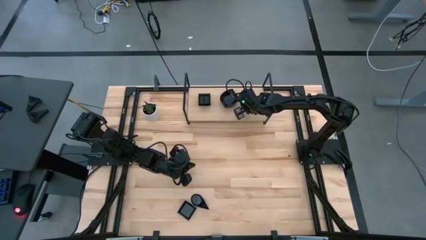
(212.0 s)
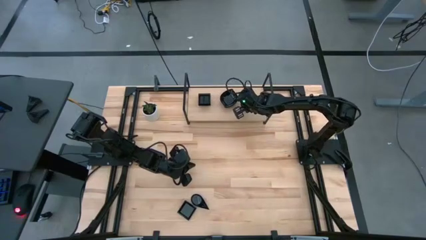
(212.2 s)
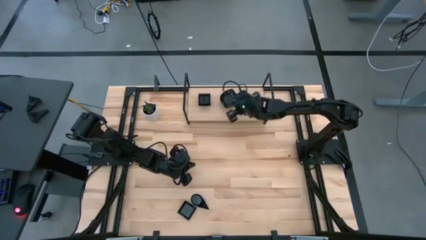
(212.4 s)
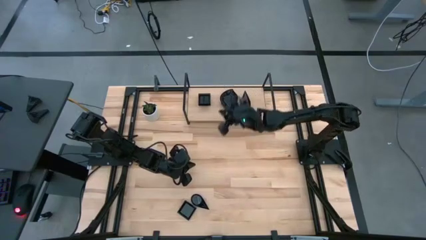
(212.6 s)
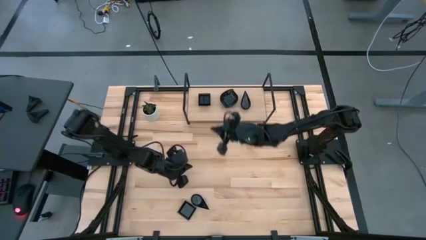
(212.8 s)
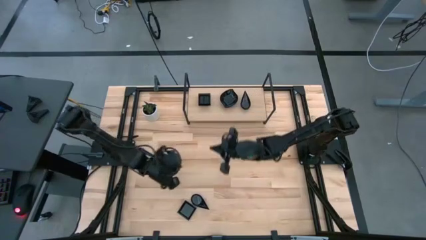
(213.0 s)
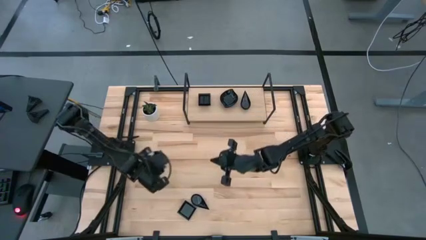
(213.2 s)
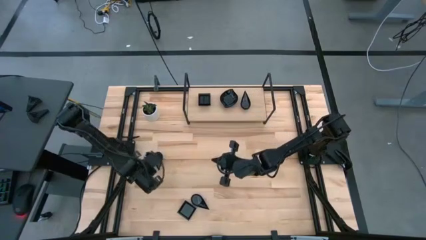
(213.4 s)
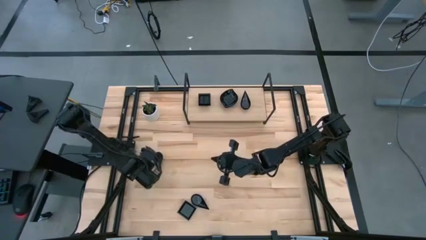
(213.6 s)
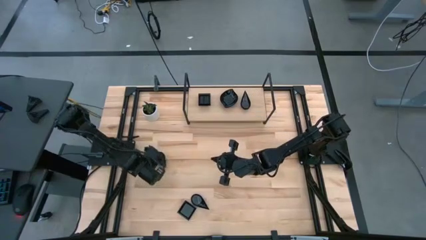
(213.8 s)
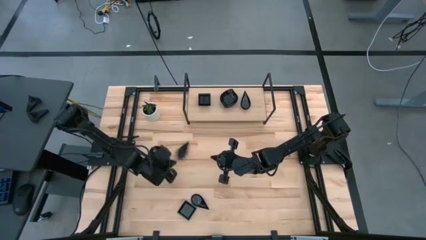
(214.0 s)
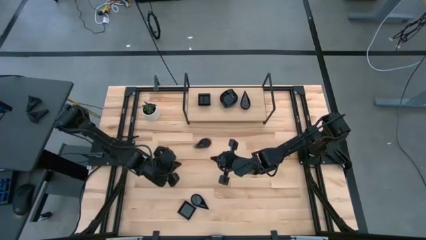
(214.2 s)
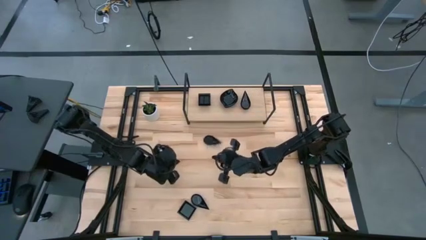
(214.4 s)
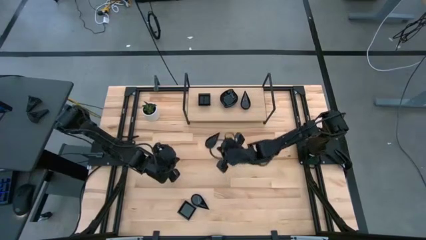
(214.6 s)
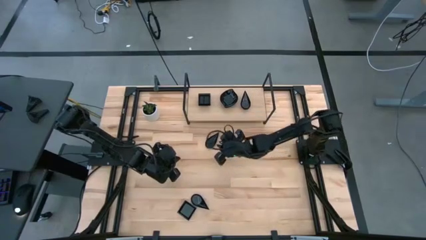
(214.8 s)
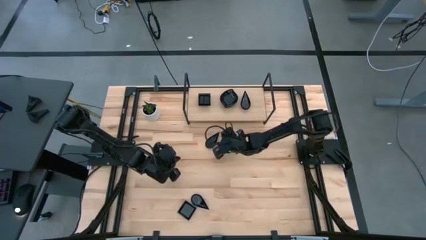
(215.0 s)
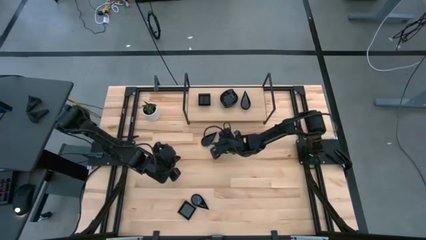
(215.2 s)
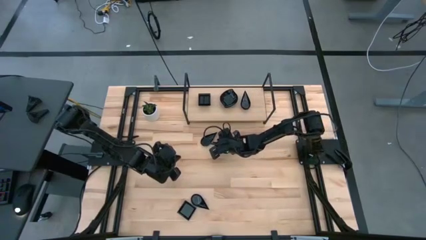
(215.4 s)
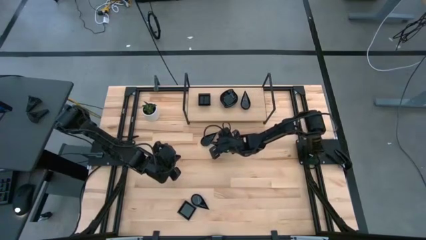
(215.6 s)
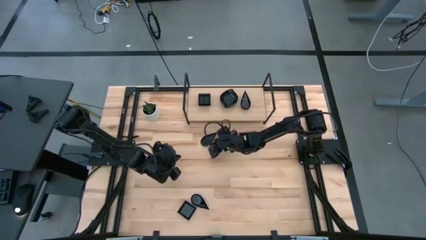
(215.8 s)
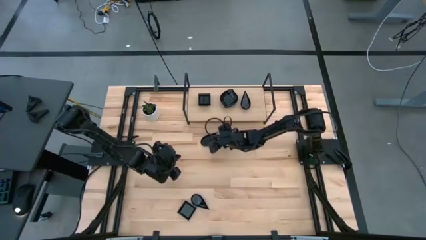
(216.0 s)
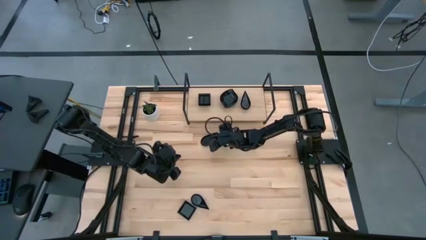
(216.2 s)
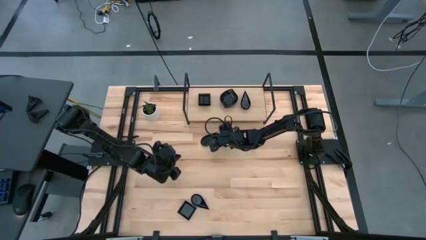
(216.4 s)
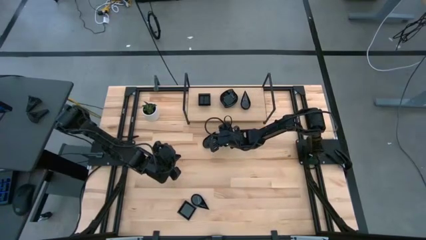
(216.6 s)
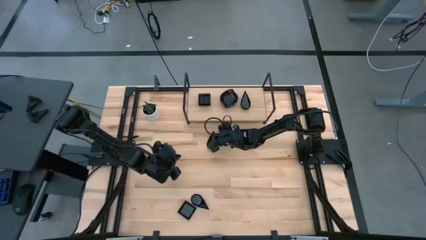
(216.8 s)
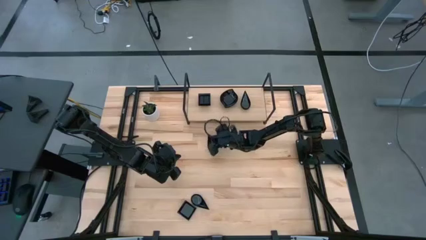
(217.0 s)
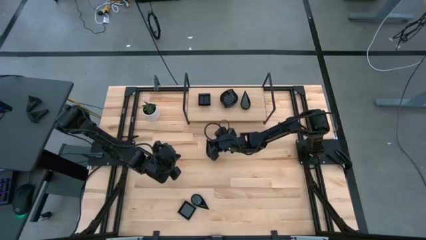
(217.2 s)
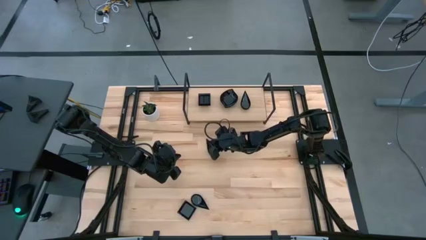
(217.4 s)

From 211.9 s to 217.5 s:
Task: Pick & Place Mini shaped plates
Stack the black teardrop shaped bowl on top of the other black teardrop shaped bowl on the shelf

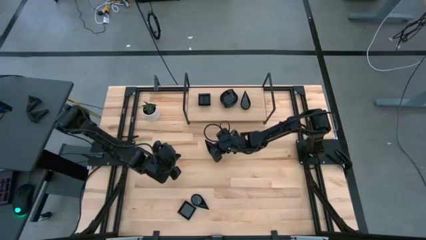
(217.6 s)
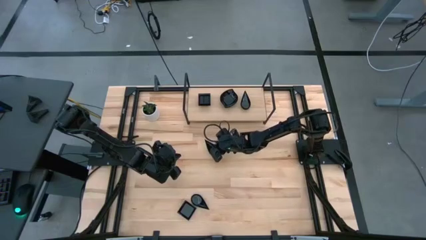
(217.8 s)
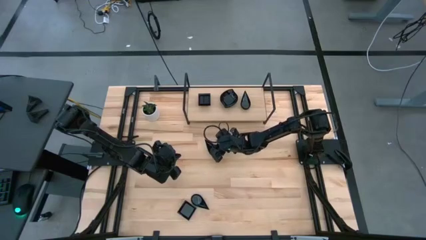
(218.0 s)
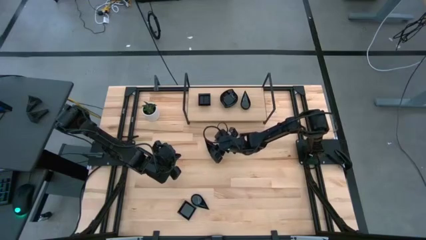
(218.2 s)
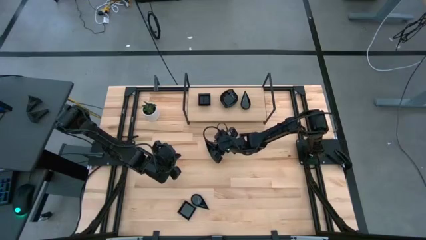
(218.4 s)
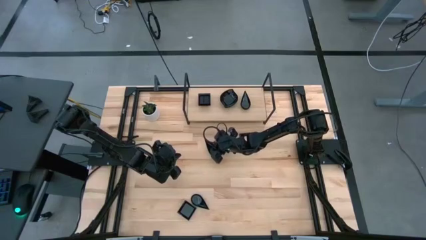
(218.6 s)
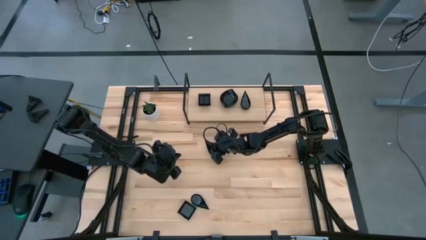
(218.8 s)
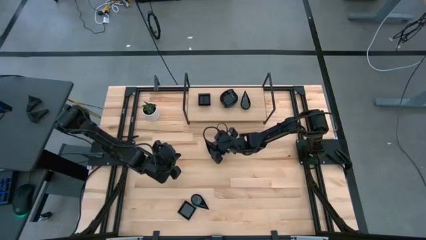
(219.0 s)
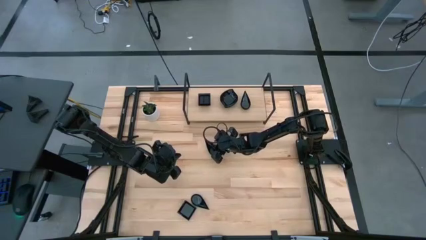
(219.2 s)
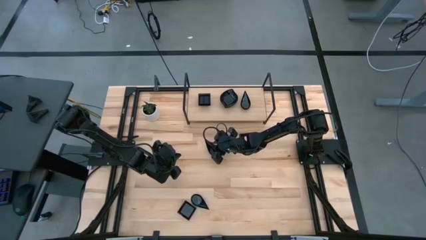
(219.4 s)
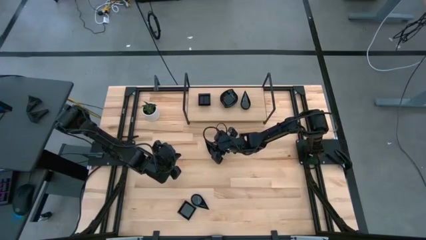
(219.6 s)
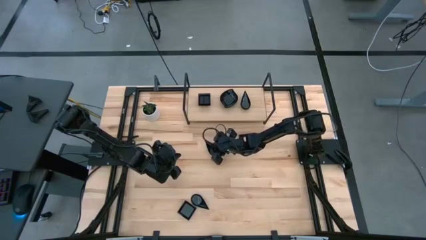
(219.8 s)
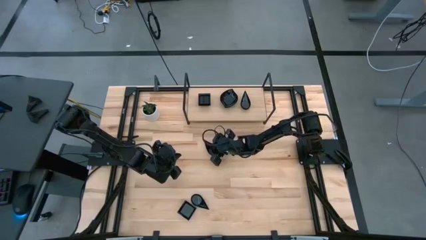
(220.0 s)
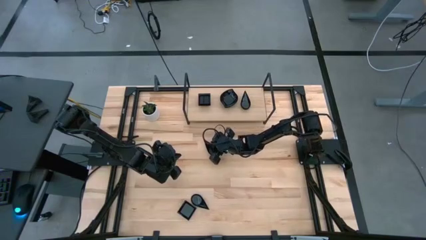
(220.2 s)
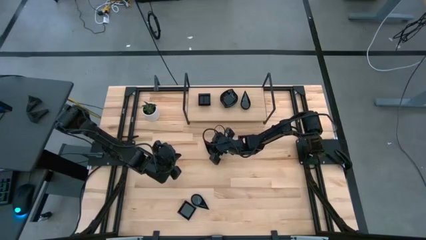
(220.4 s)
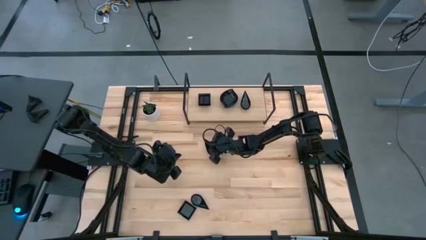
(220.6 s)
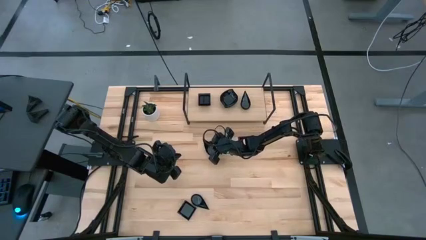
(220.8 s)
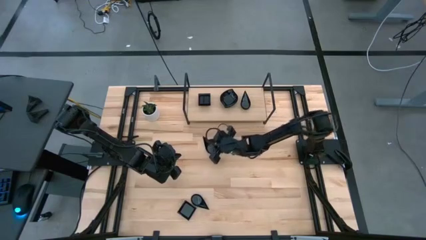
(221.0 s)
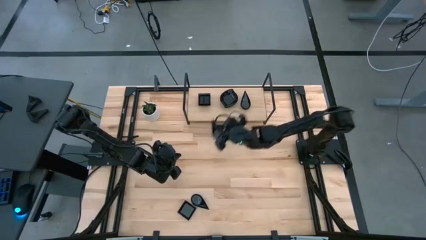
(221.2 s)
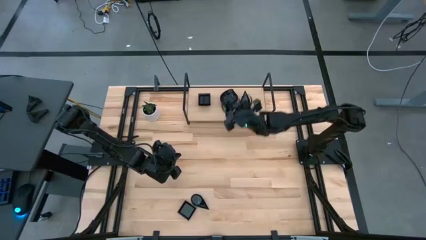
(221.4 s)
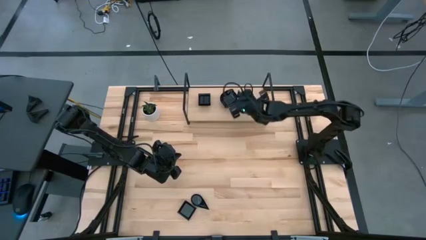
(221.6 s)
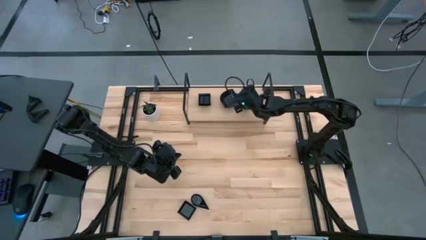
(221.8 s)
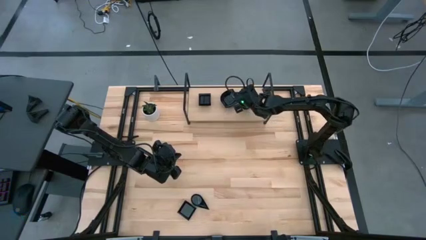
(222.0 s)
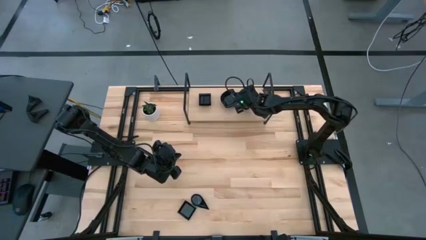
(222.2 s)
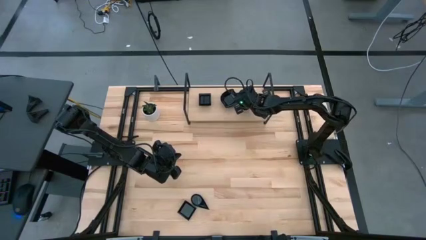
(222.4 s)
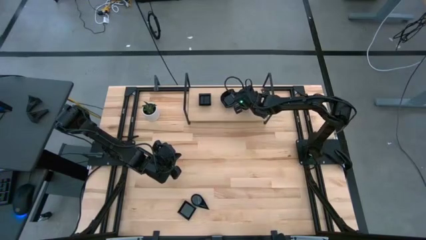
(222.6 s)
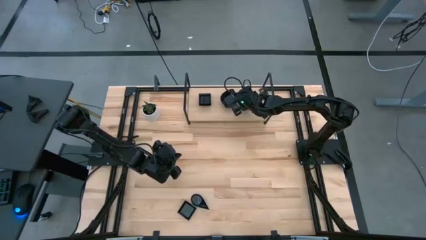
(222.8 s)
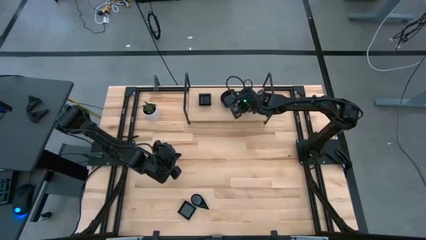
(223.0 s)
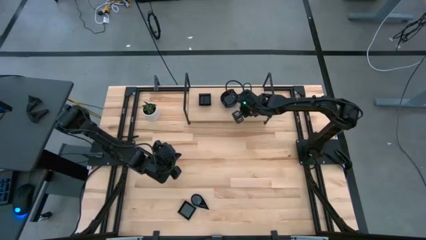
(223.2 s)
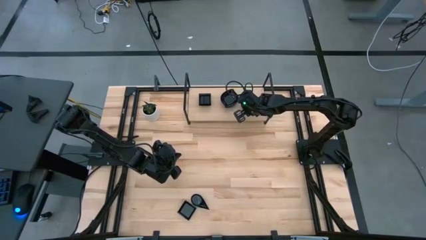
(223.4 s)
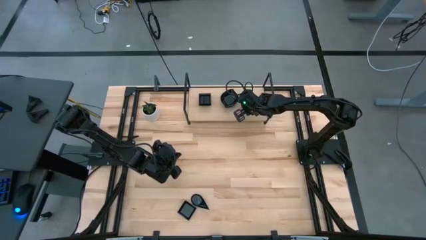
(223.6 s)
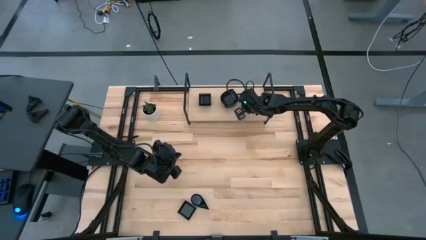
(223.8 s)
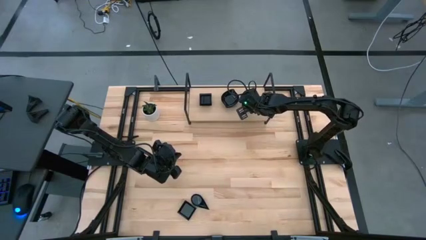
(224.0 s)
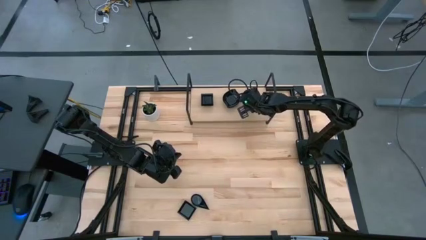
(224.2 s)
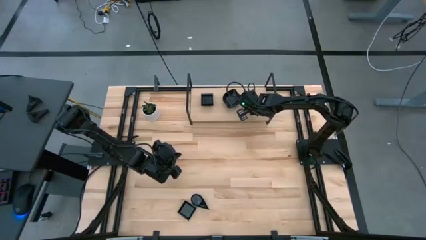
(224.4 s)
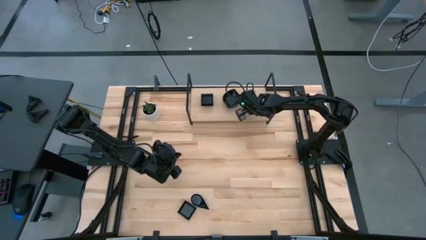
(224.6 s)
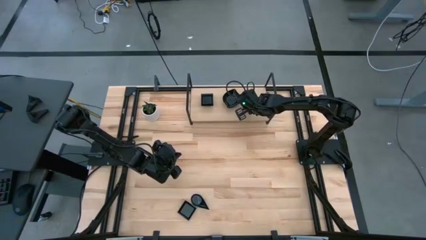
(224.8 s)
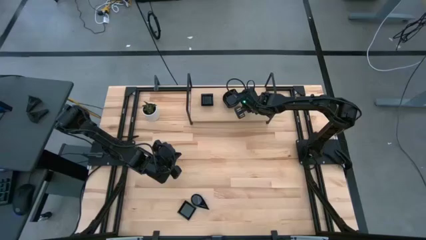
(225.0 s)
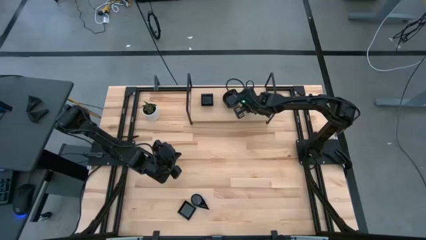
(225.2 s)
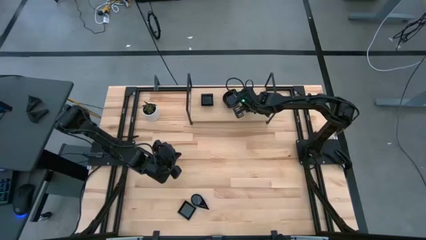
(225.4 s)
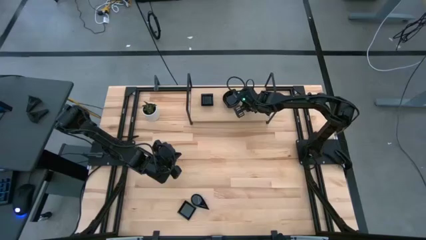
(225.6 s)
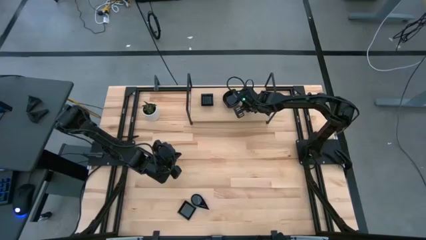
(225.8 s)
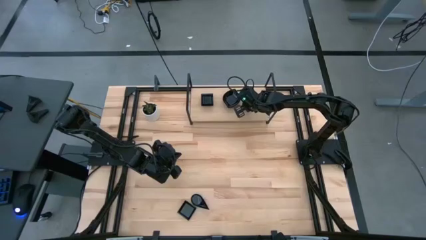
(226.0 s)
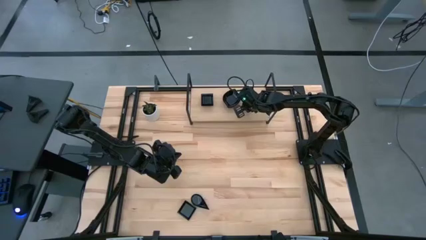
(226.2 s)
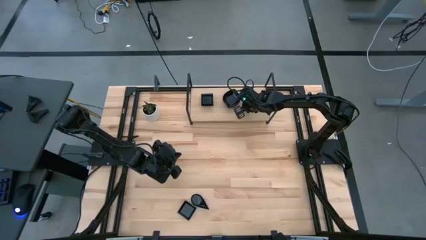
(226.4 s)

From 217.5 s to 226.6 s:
Stack the black teardrop shaped bowl on top of the other black teardrop shaped bowl on the shelf

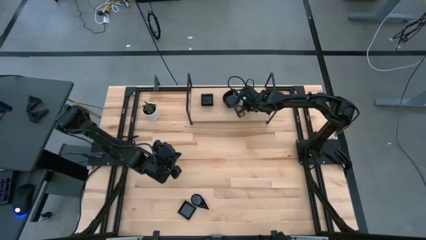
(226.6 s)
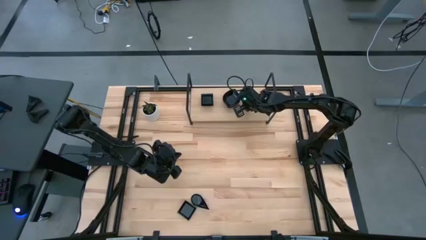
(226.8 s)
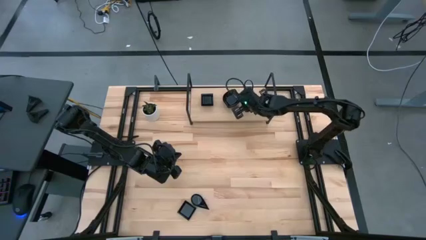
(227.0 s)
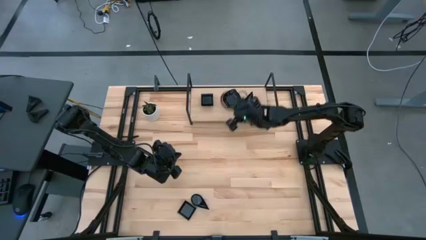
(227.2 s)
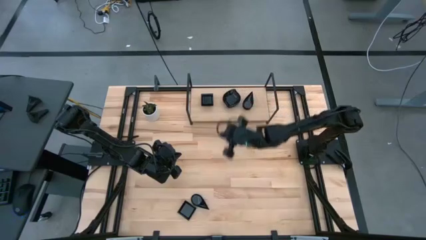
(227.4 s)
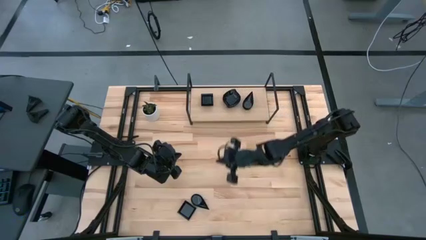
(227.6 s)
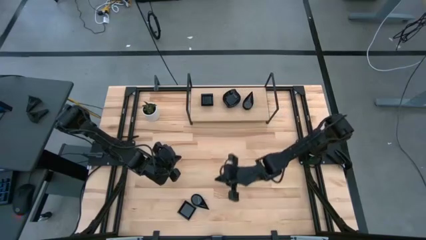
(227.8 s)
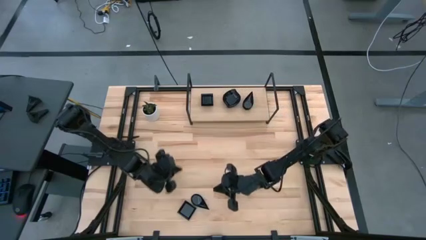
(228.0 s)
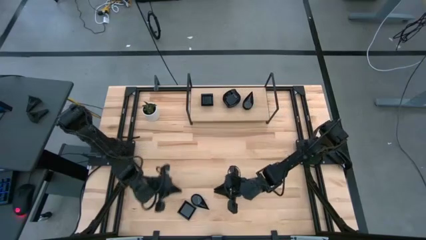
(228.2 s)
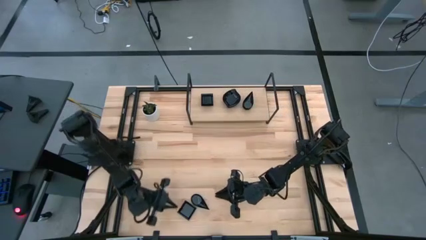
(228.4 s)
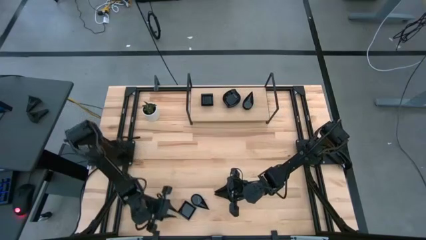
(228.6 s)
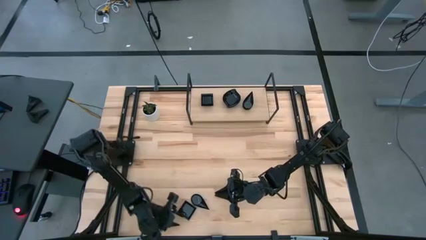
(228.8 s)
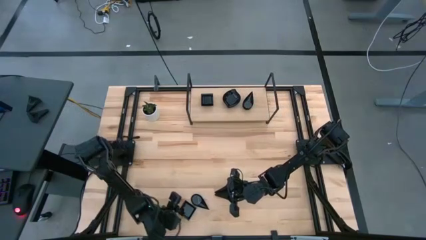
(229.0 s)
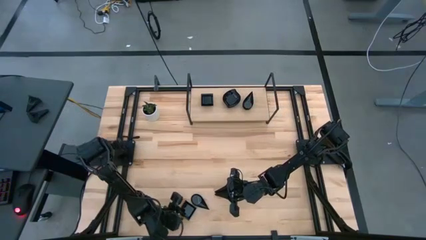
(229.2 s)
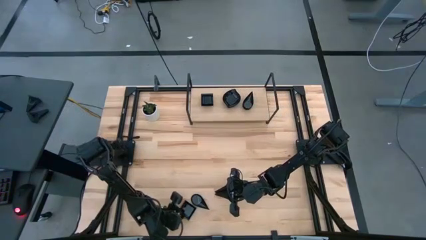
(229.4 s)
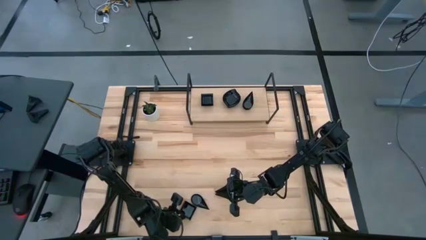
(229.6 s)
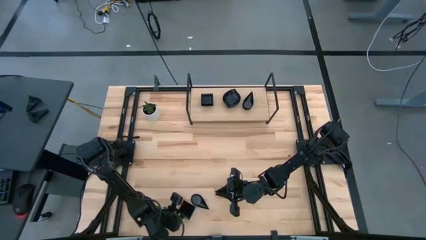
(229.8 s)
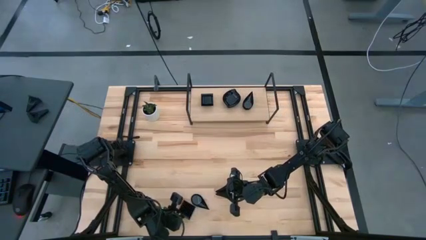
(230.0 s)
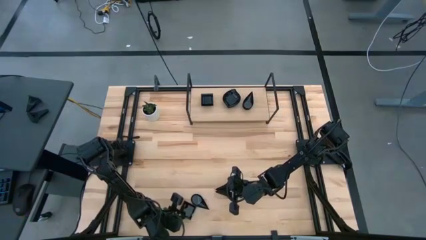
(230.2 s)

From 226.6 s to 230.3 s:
Stack the black square bowl on top of the other black square bowl on the shelf
